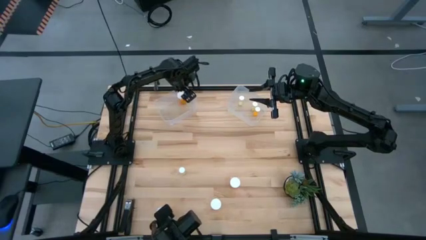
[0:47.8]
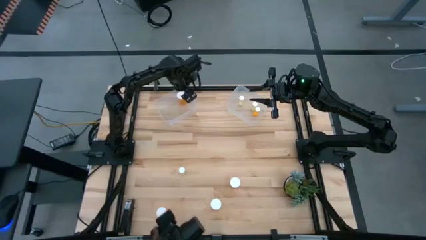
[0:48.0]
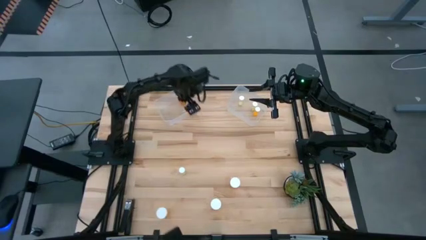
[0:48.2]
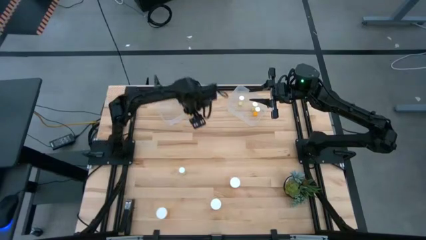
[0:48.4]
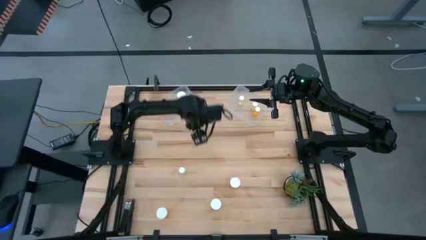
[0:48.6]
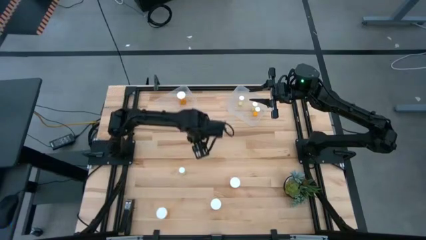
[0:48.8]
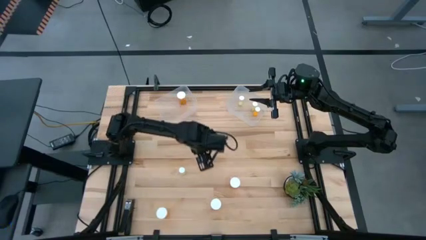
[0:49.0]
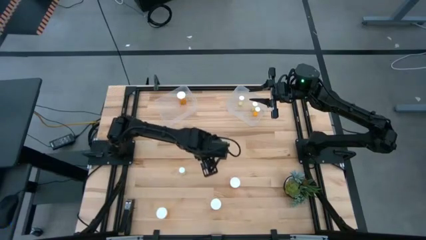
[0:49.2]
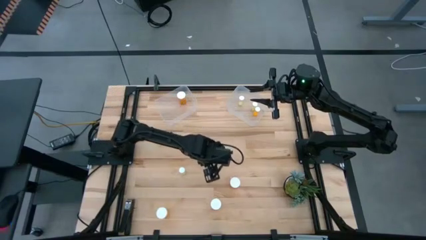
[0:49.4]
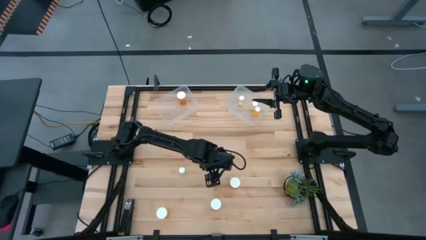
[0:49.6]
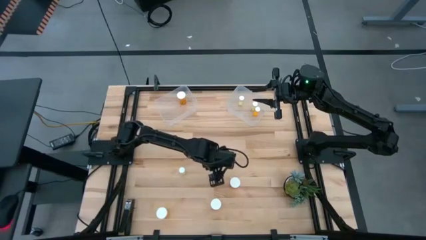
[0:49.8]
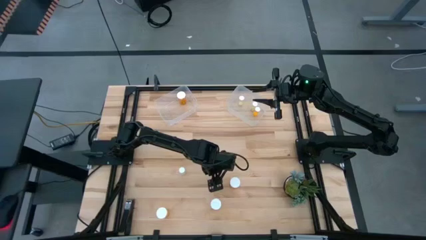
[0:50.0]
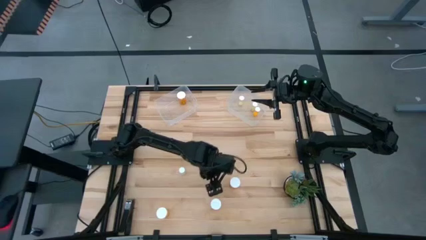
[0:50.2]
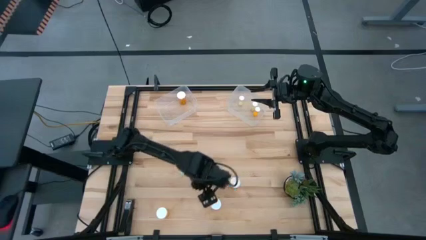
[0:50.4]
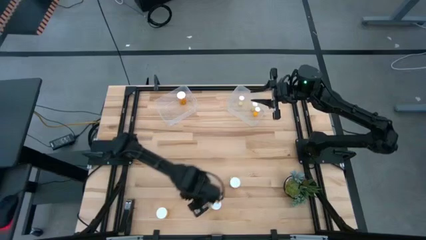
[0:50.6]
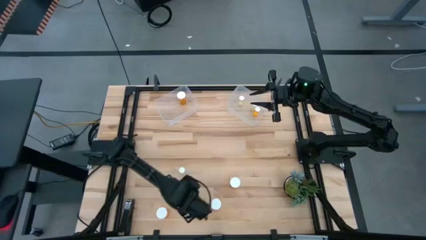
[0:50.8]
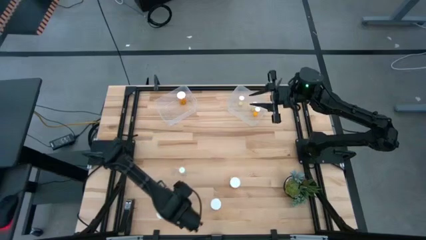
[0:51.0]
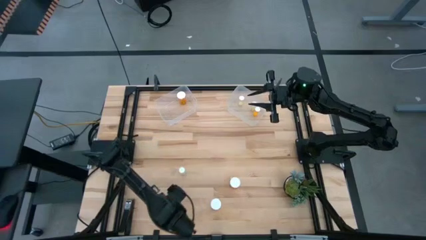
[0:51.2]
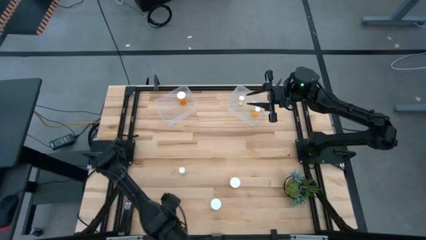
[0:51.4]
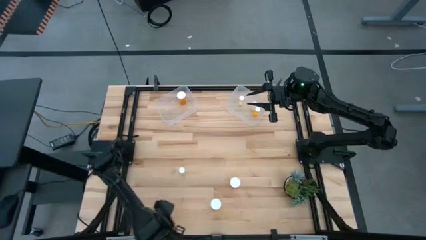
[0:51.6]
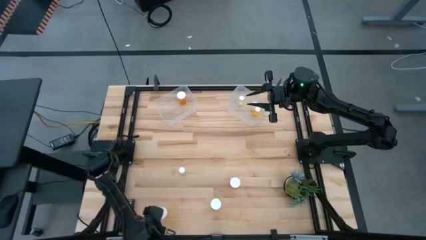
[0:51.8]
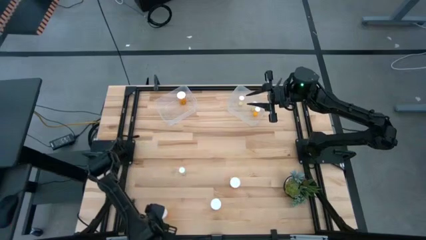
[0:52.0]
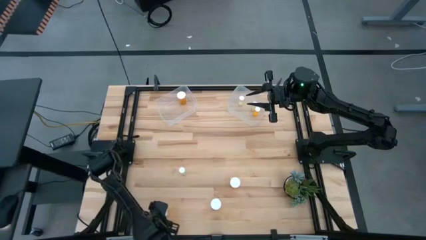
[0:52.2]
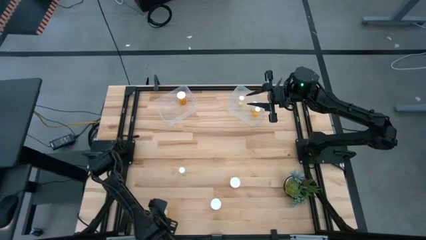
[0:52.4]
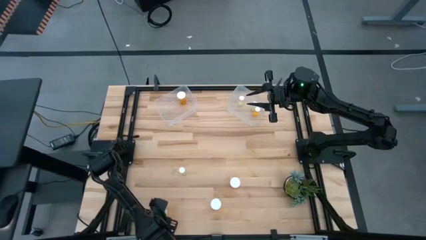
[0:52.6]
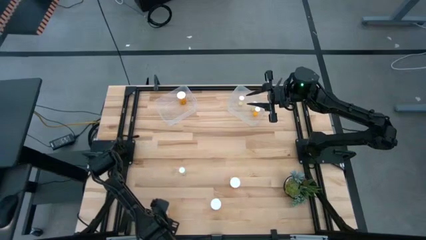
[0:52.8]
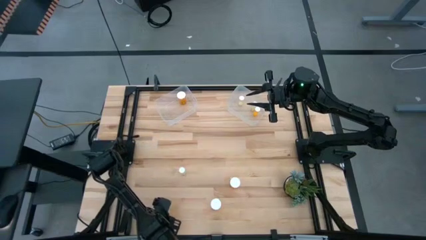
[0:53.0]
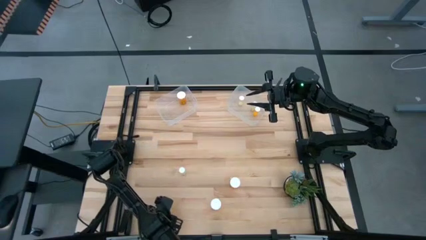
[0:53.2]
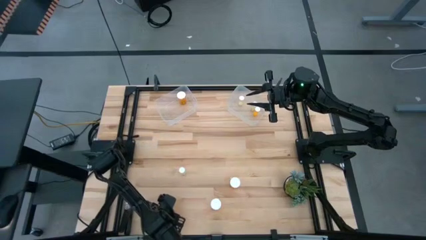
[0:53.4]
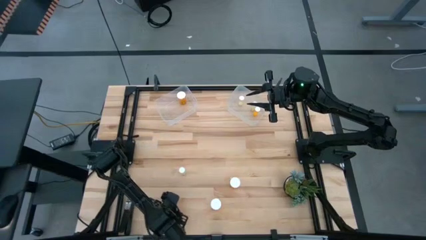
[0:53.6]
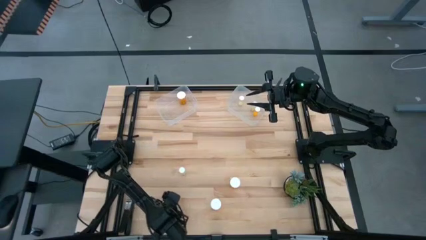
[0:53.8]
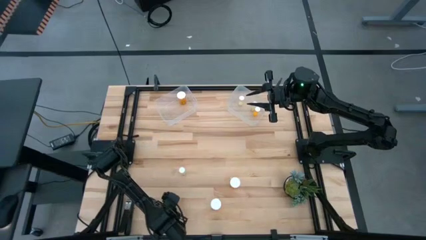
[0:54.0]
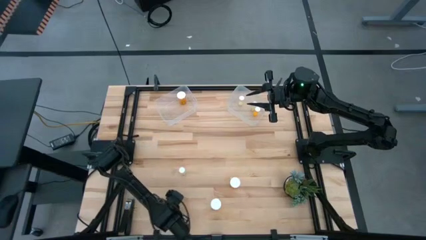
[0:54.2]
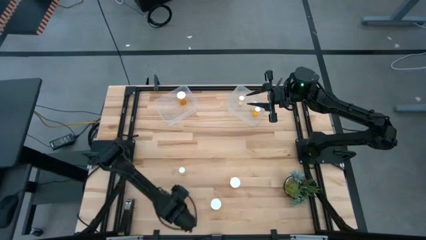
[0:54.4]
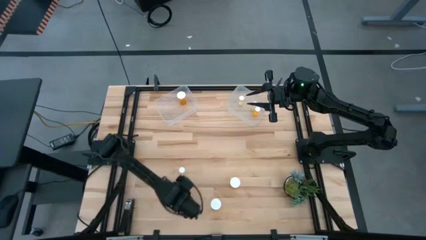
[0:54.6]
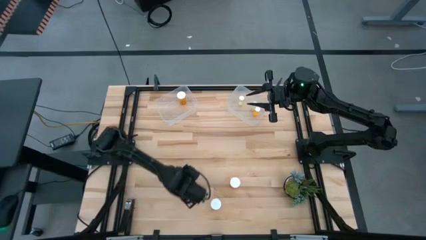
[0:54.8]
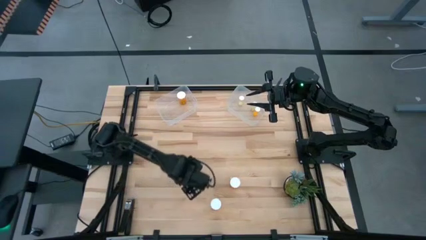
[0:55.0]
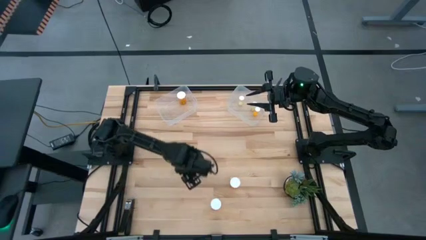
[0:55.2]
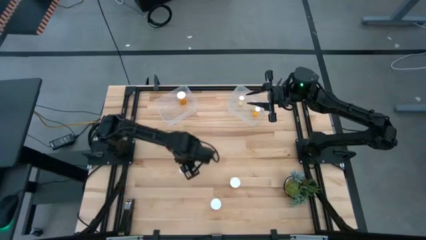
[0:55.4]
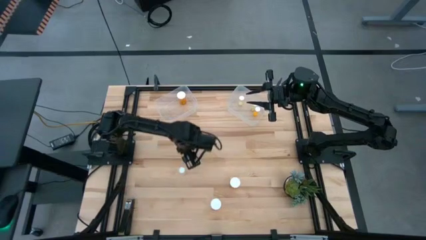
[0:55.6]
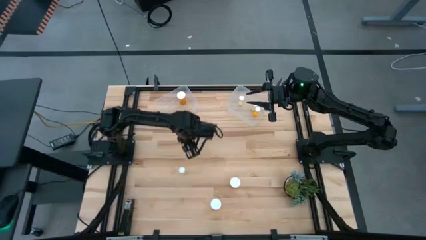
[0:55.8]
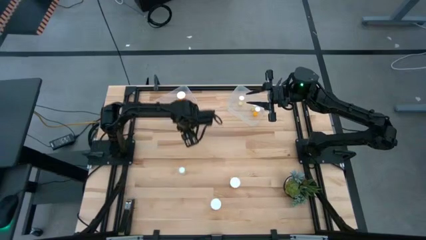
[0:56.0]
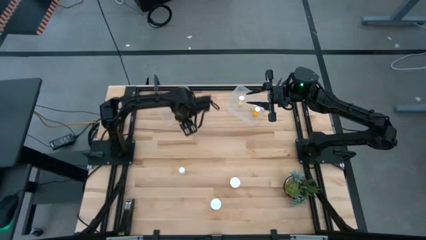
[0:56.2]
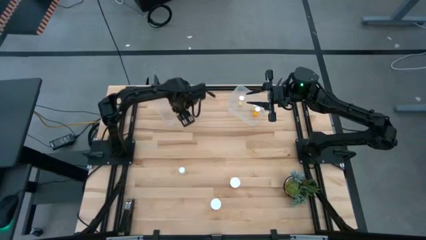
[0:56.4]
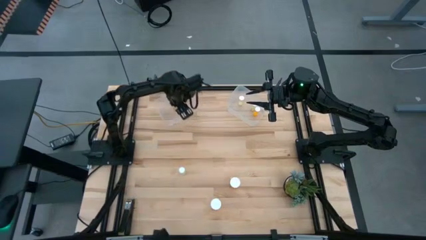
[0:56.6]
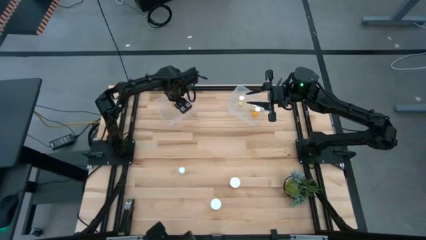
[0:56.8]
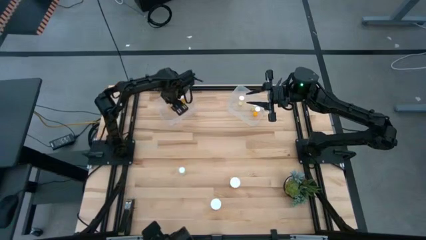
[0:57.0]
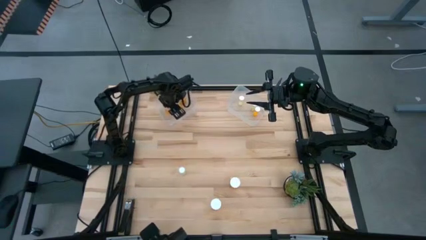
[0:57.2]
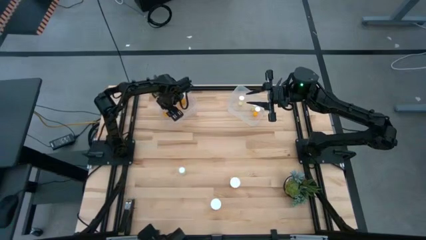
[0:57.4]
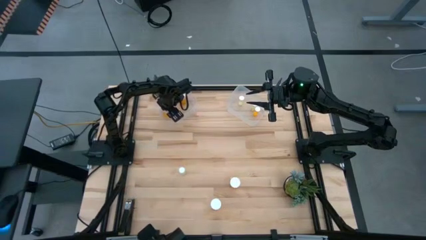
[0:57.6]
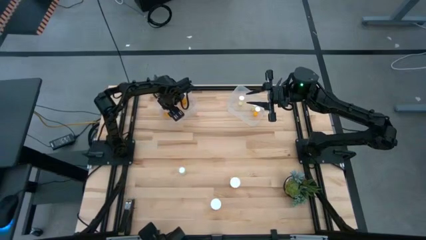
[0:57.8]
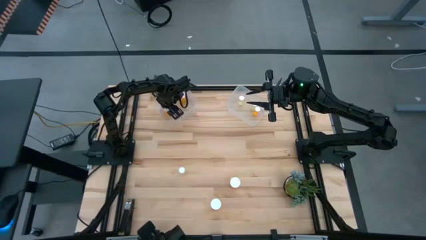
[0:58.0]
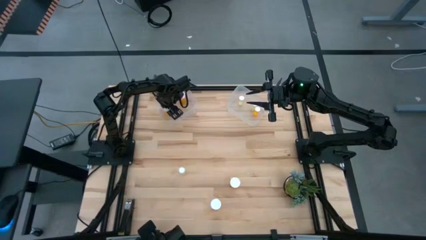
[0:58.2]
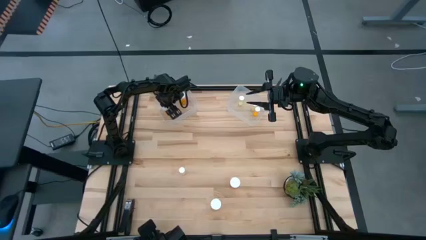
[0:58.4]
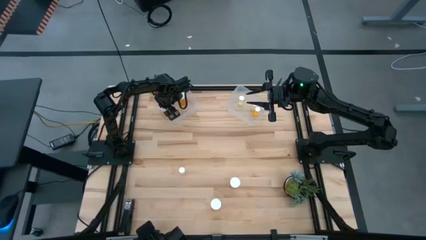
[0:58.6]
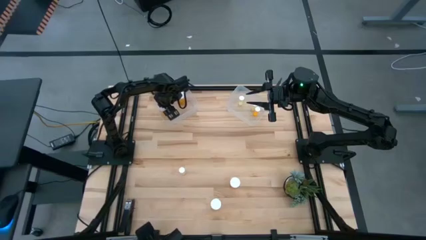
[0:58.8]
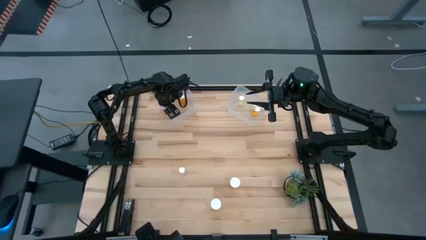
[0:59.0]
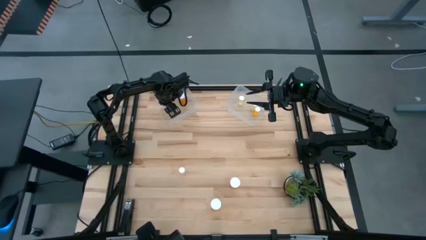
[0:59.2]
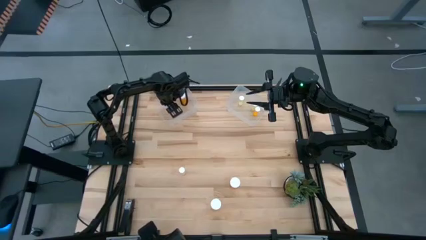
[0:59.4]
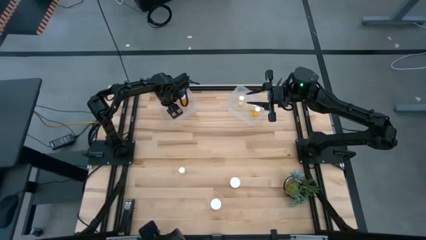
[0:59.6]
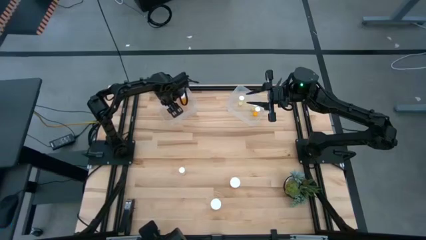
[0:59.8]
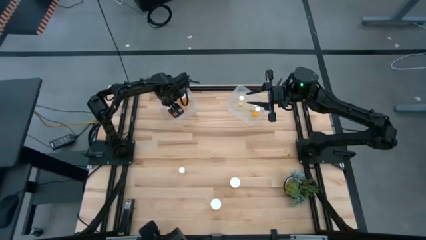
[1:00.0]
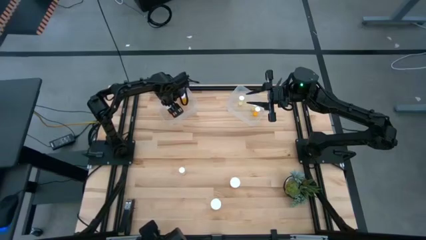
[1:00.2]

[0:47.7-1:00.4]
Task: Pick and place medicine bottles into bin by pill shape (circle, oval)
Put the large orange pill bottle into the left transparent bin
